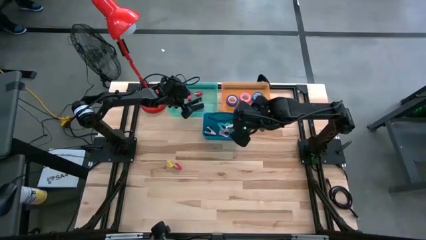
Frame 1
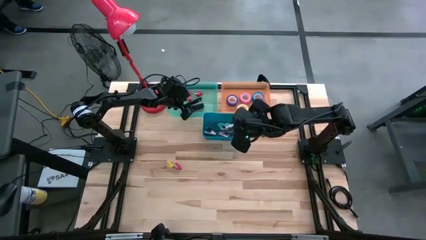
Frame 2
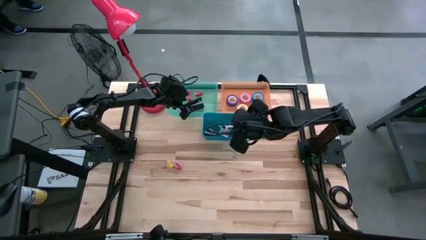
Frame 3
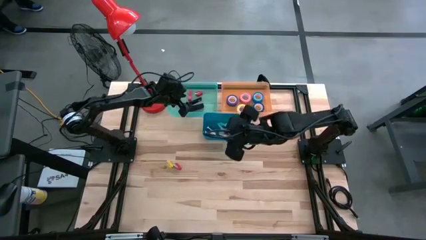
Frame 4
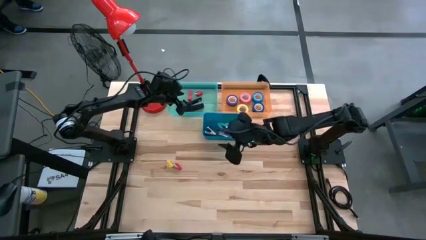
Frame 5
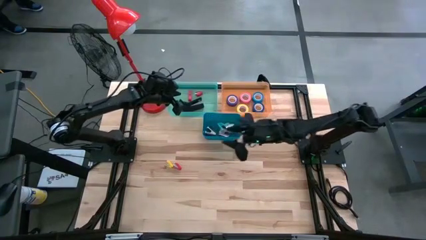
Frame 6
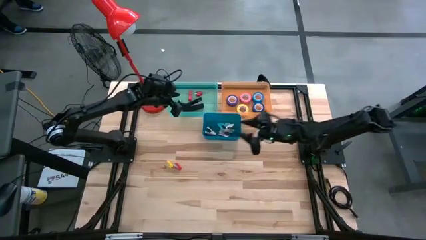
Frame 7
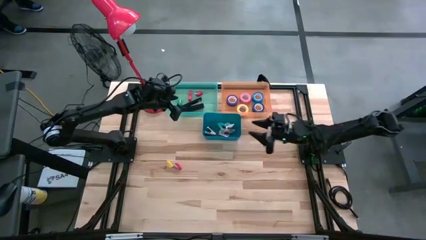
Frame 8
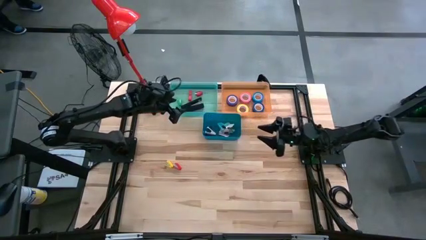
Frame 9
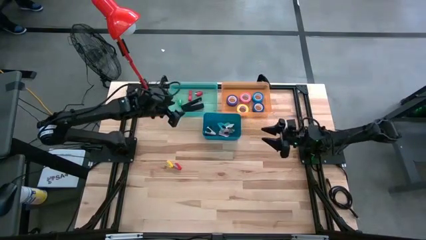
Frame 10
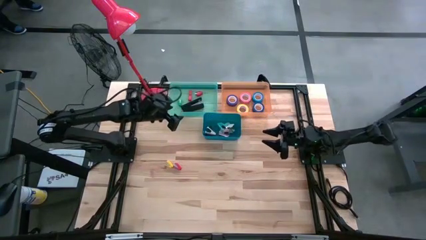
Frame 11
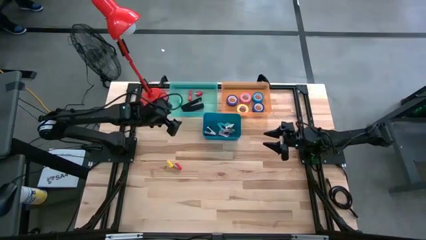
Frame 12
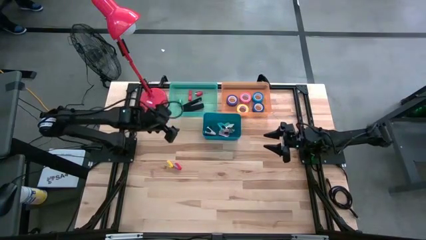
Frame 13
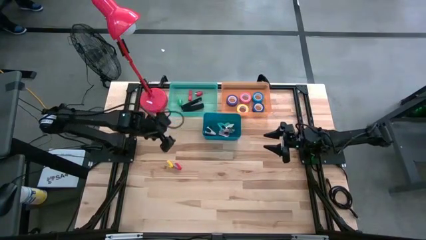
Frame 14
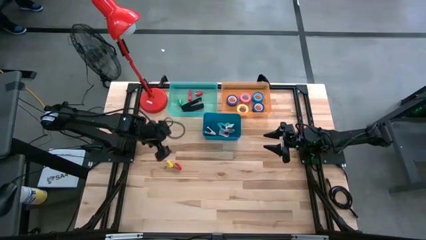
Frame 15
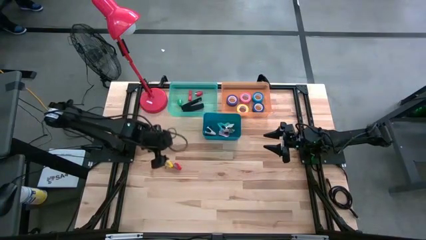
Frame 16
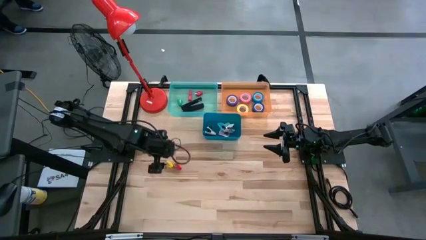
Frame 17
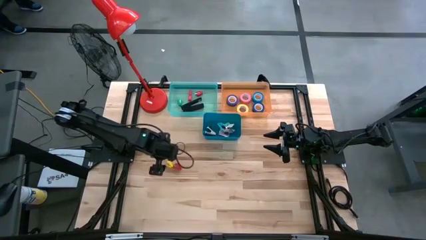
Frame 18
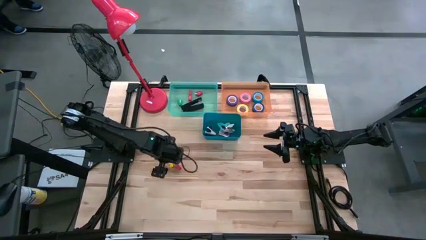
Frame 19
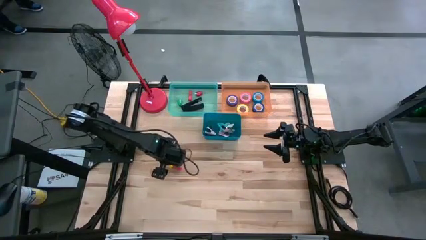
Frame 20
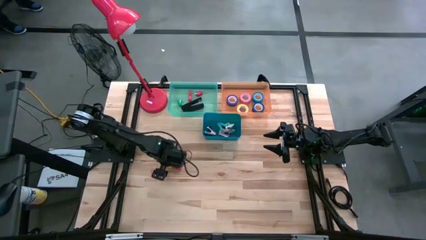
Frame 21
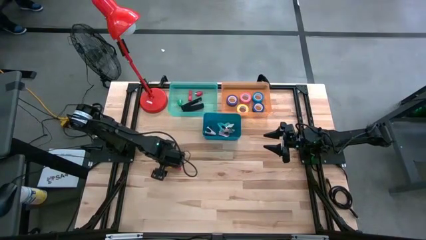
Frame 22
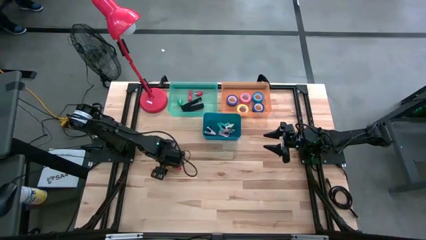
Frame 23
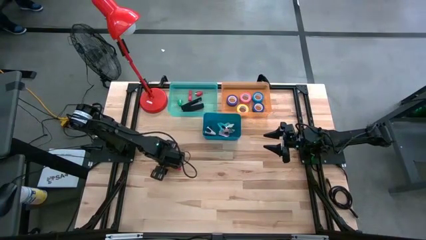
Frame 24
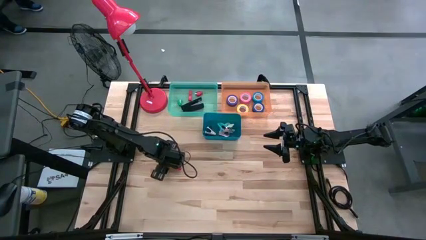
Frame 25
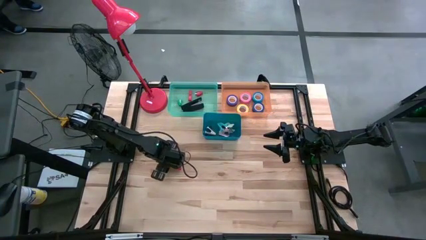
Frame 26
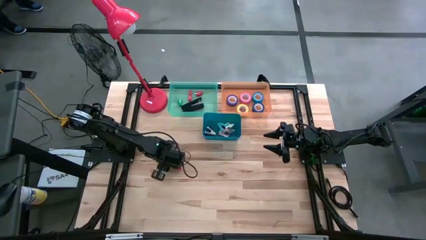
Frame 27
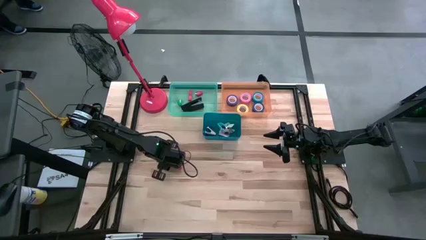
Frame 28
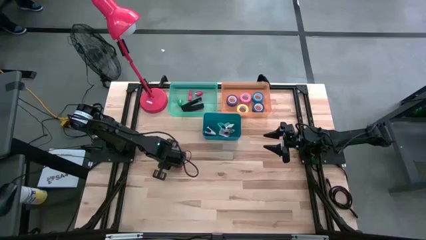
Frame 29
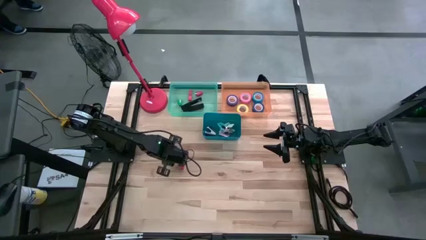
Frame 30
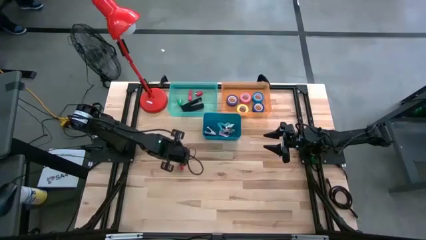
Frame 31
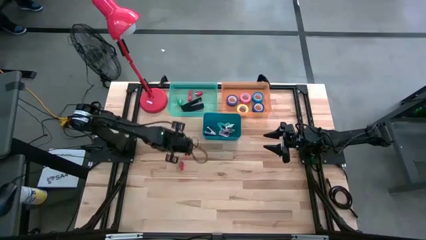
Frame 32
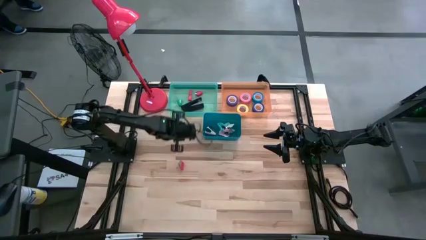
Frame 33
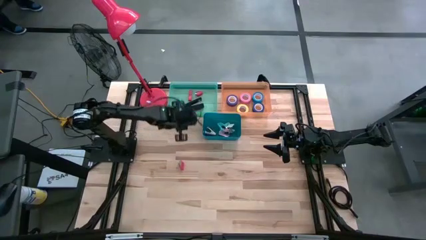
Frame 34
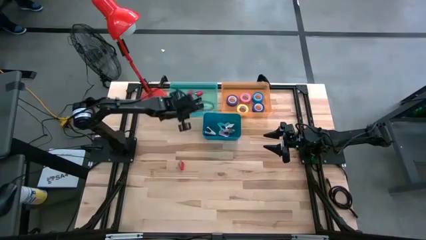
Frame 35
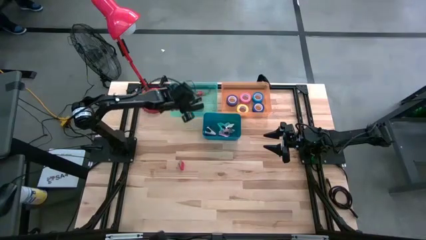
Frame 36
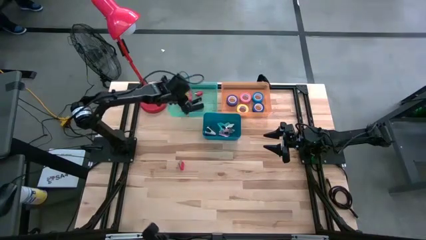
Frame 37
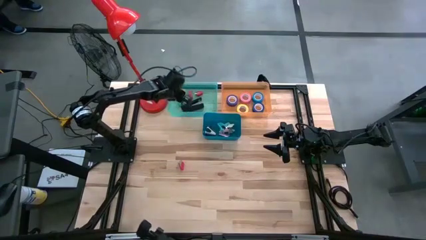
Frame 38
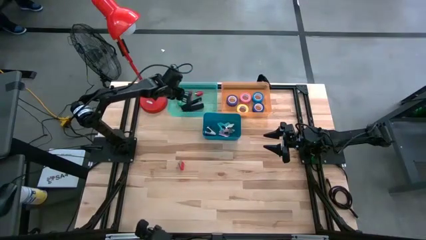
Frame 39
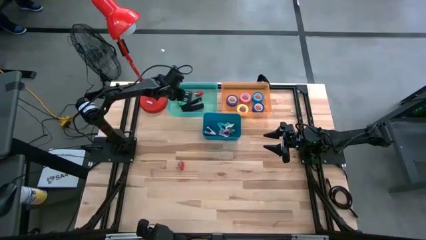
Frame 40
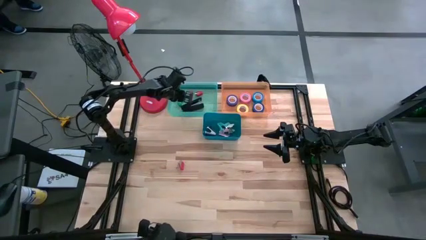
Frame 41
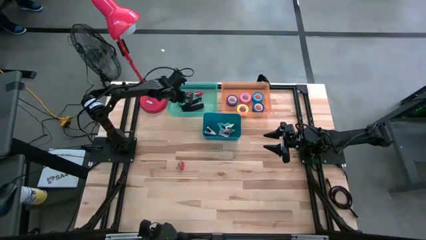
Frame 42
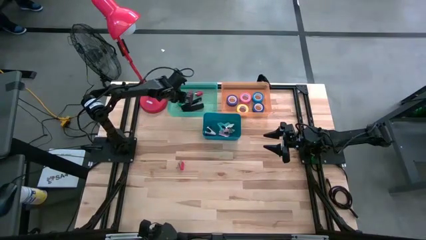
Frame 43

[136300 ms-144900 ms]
Task: Pick and place Stapler, Stapler remover, tape
Put the yellow stapler into the green bin

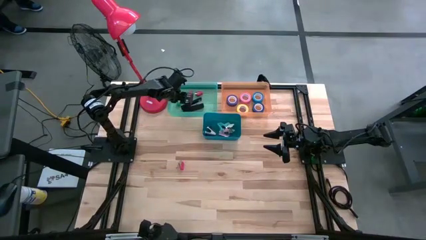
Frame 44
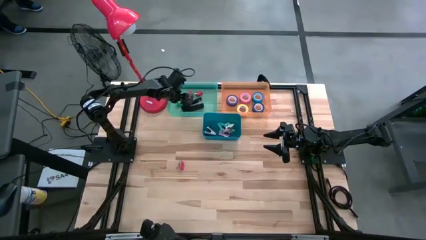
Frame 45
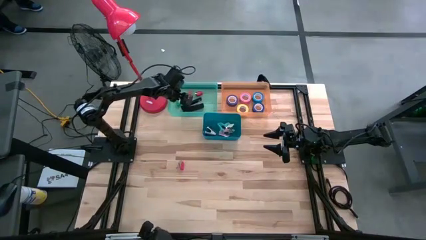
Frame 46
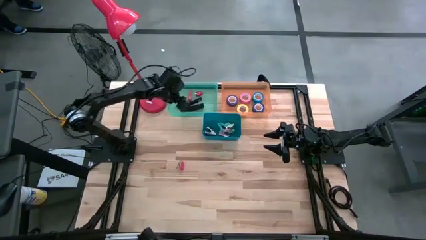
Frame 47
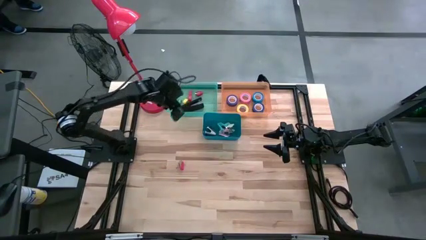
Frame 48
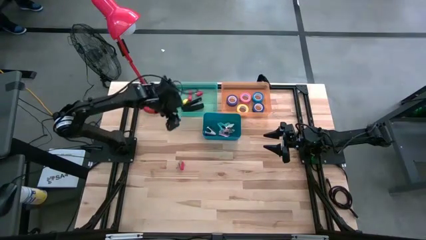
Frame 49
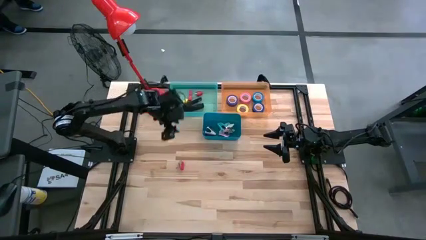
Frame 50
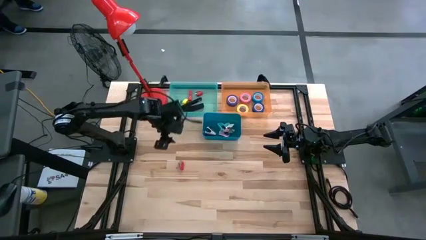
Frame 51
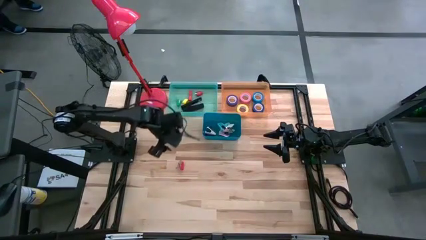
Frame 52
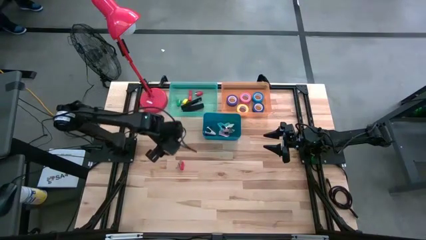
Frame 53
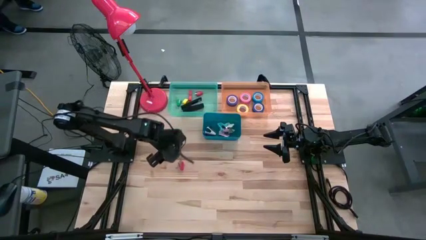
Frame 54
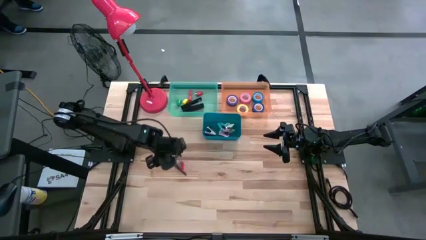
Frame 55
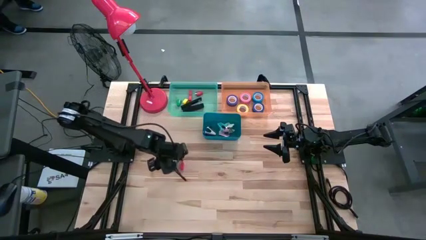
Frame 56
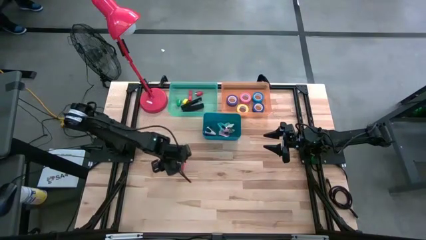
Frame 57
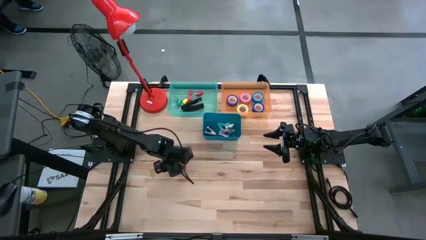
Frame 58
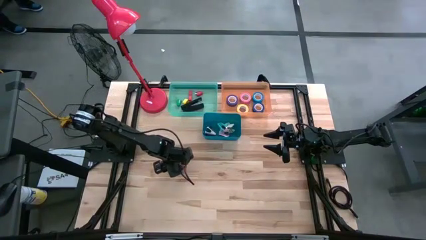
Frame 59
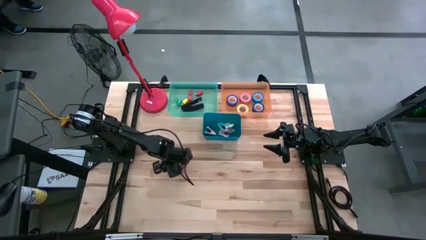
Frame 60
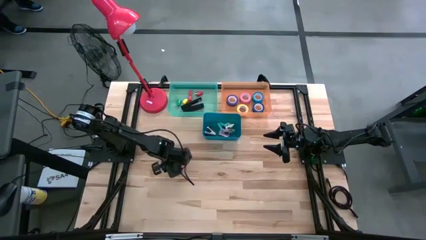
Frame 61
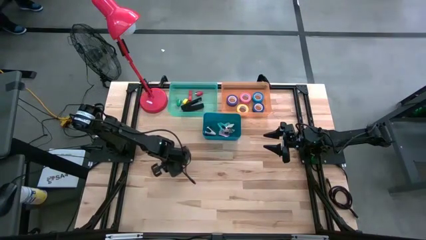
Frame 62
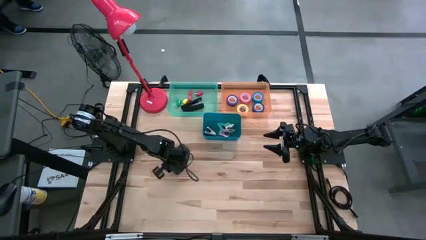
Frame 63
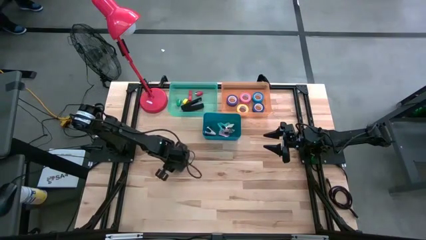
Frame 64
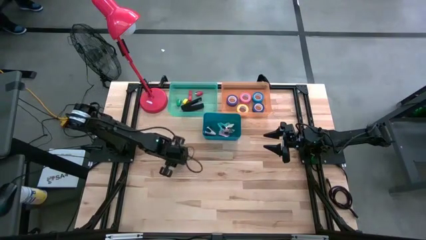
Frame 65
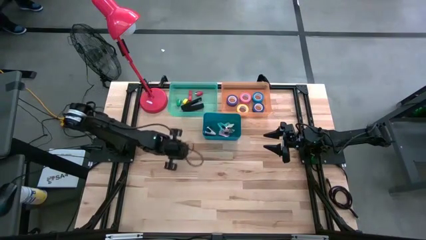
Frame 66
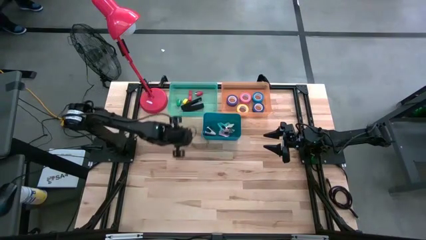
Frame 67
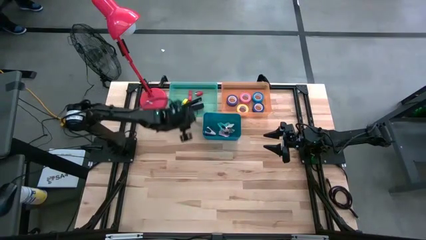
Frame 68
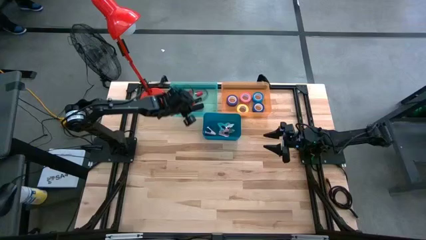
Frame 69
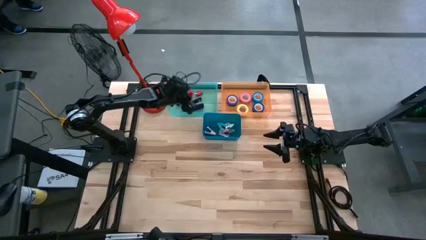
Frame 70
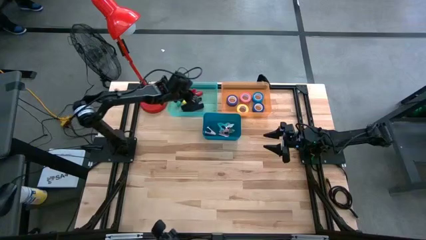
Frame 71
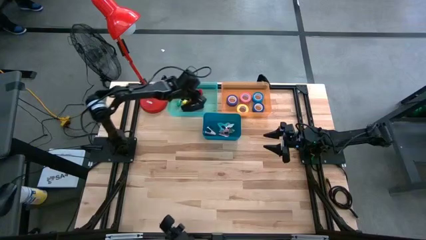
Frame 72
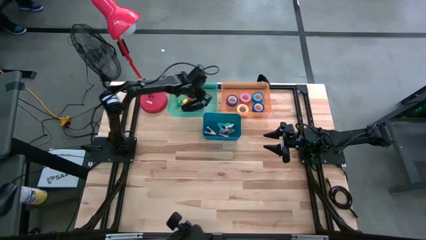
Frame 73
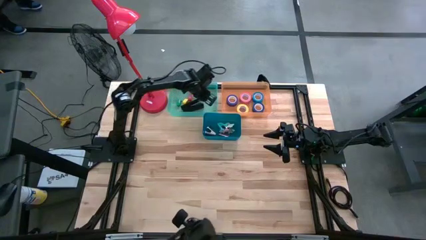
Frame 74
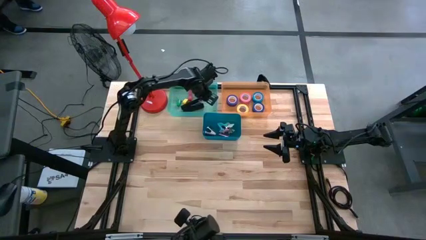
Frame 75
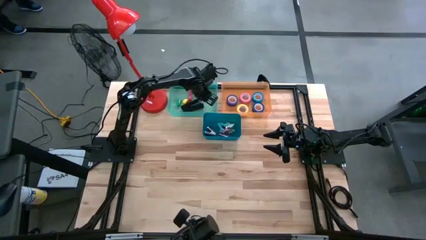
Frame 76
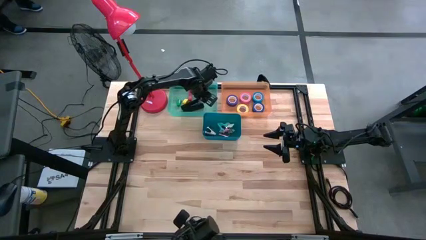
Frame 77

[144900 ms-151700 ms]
Put the red stapler into the green bin

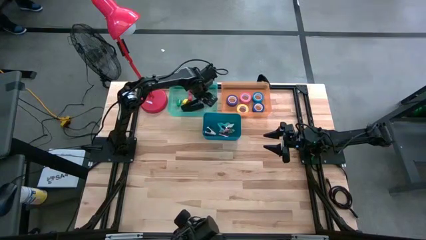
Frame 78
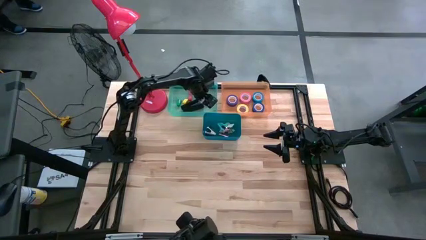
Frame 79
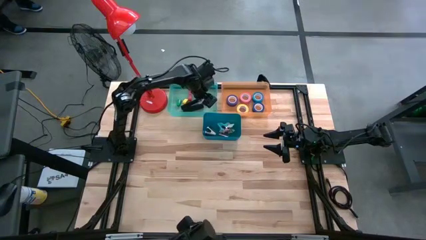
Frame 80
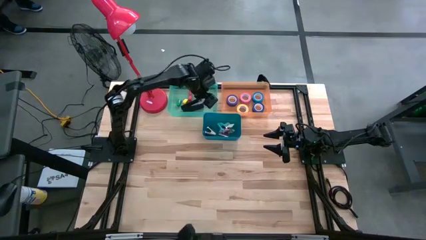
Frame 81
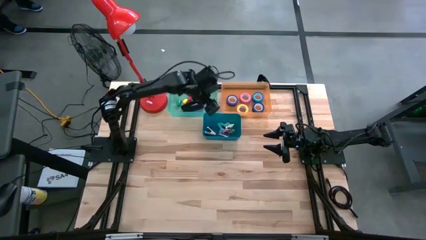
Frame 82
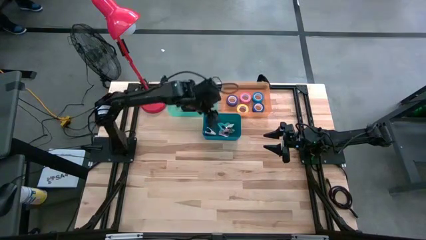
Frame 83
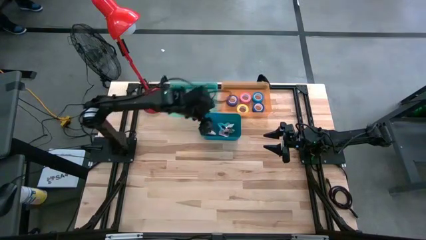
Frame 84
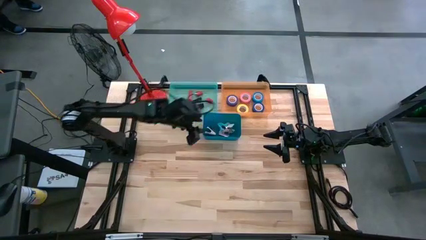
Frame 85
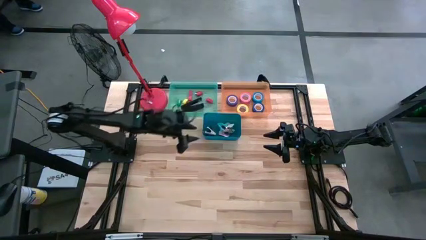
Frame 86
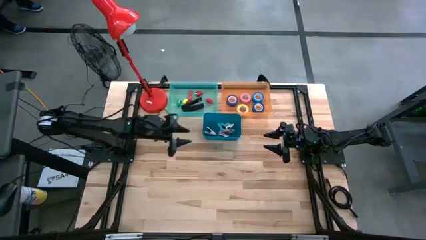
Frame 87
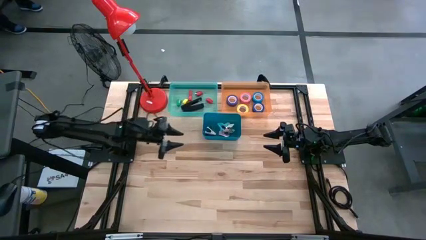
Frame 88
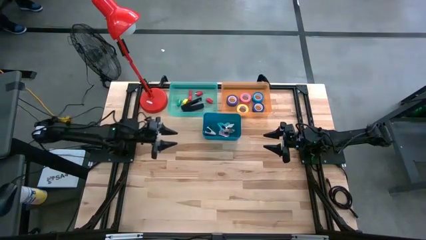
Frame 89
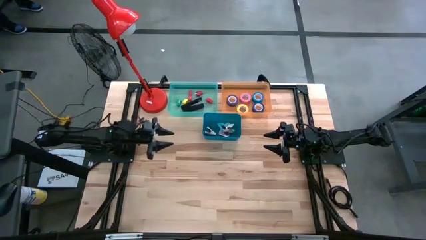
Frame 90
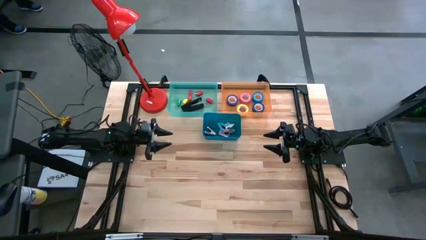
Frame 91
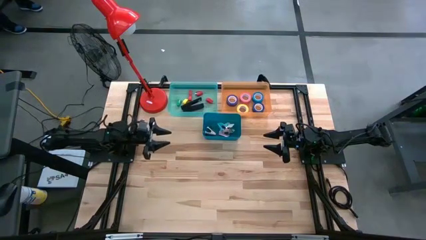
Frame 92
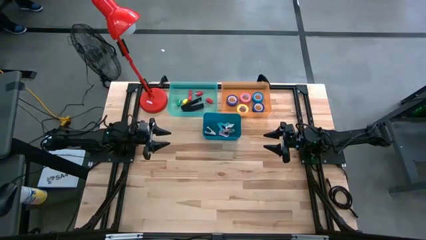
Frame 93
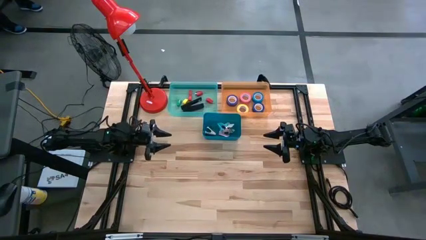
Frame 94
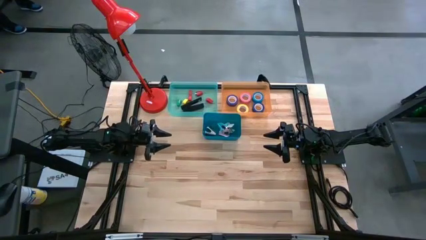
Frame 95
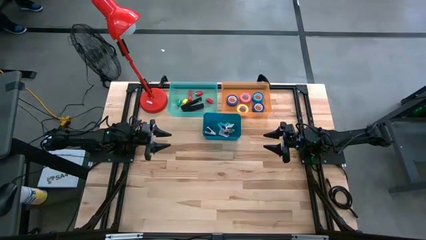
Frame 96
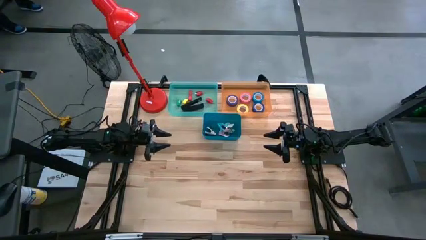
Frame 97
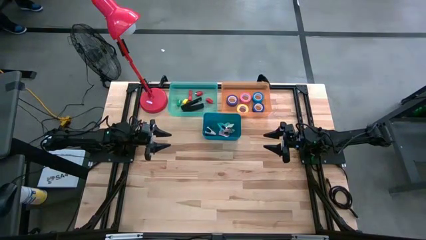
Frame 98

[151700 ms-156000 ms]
Return to Home Position
